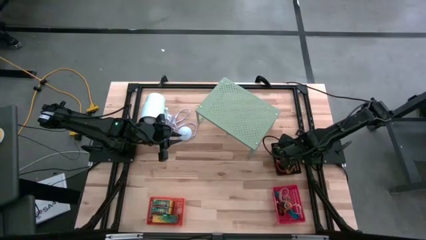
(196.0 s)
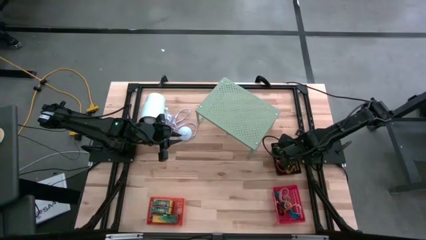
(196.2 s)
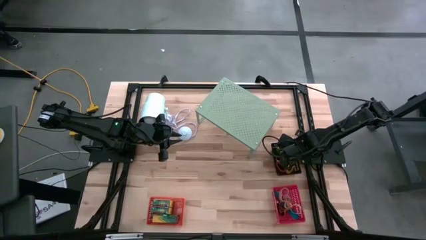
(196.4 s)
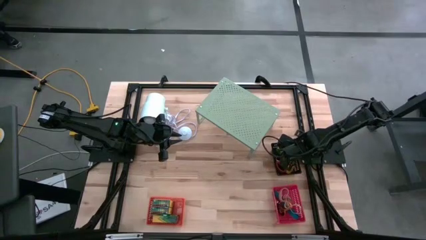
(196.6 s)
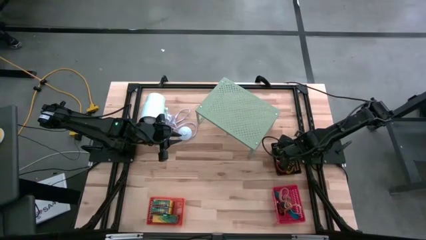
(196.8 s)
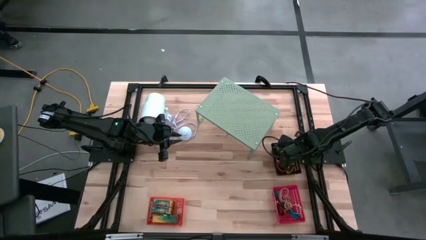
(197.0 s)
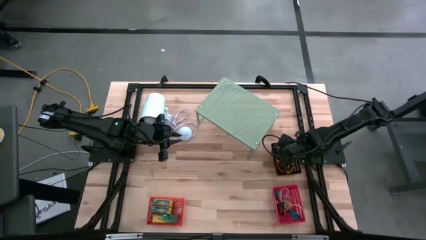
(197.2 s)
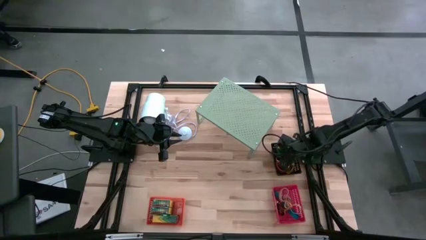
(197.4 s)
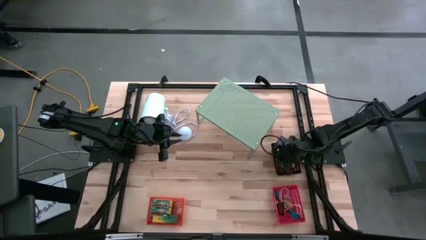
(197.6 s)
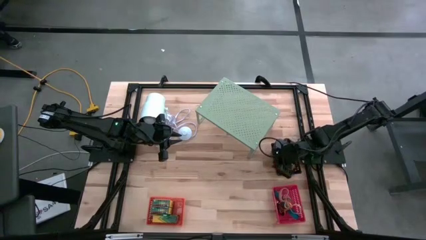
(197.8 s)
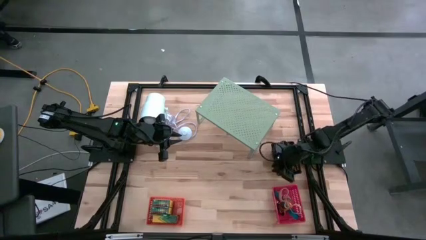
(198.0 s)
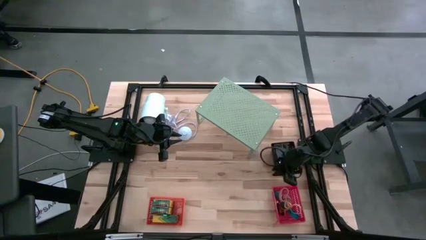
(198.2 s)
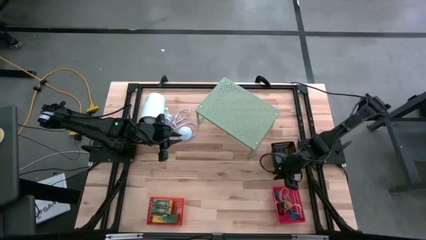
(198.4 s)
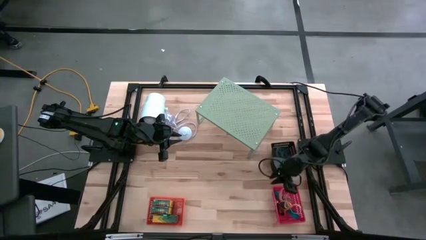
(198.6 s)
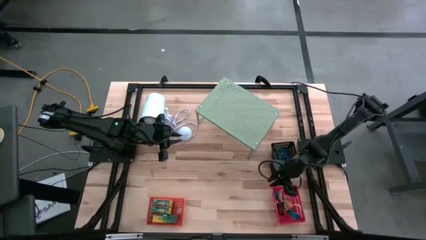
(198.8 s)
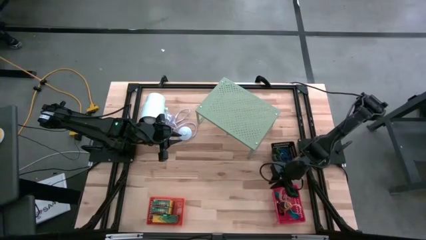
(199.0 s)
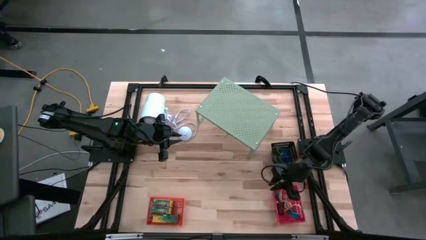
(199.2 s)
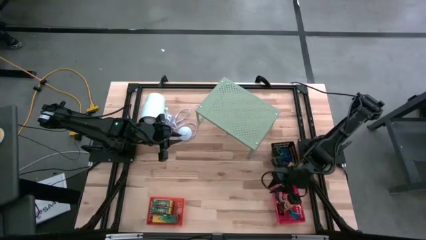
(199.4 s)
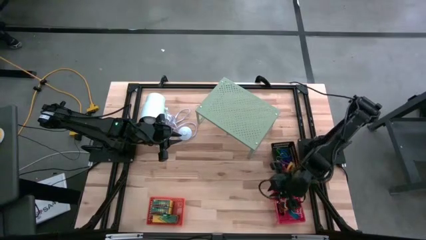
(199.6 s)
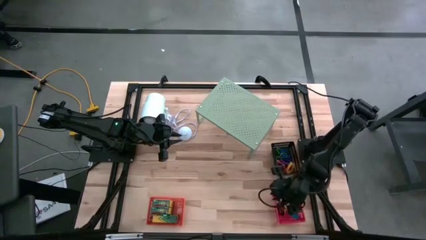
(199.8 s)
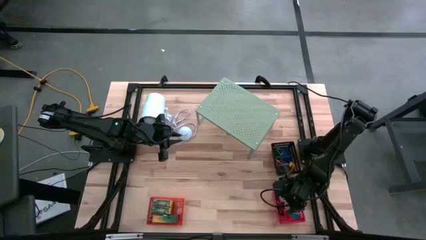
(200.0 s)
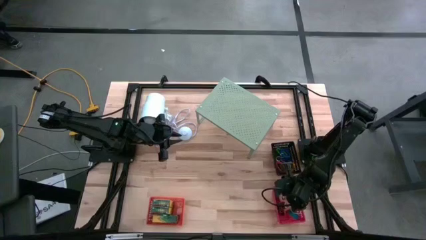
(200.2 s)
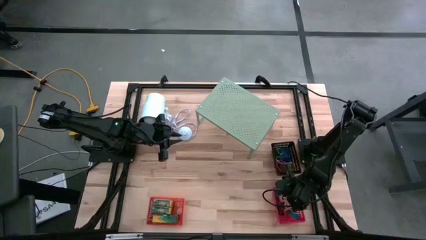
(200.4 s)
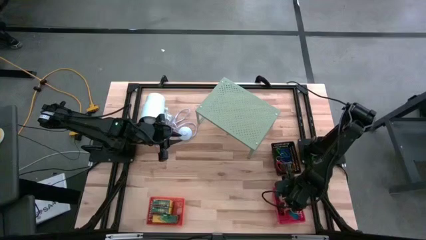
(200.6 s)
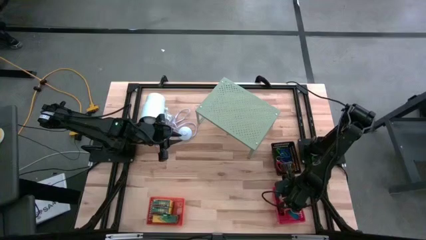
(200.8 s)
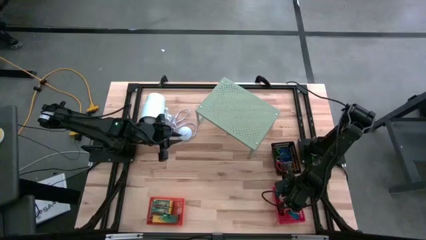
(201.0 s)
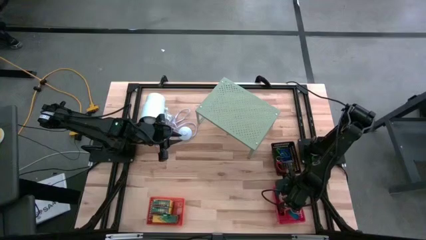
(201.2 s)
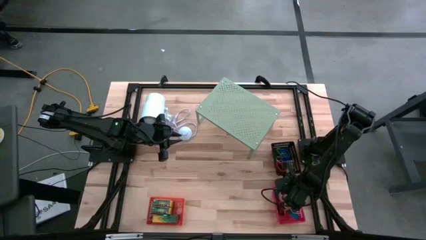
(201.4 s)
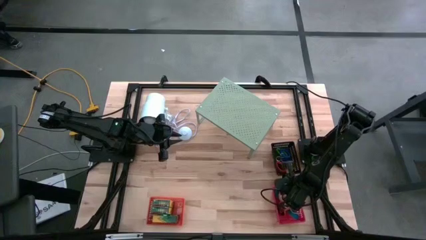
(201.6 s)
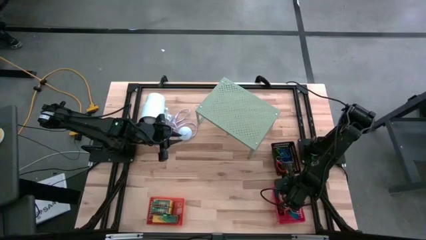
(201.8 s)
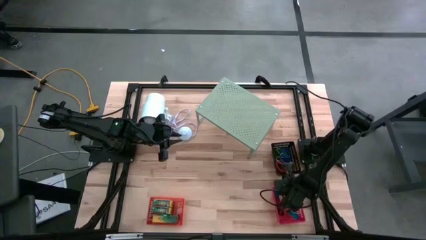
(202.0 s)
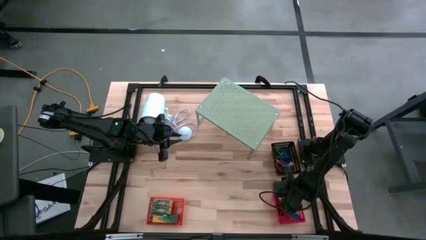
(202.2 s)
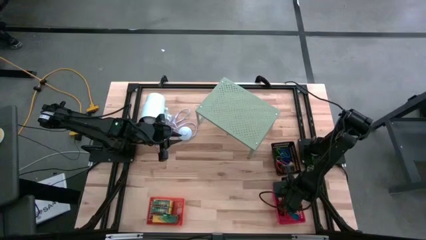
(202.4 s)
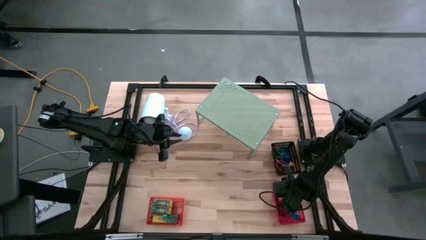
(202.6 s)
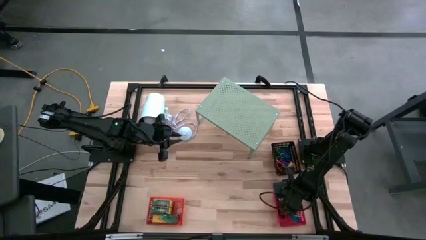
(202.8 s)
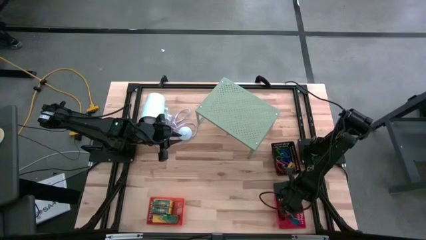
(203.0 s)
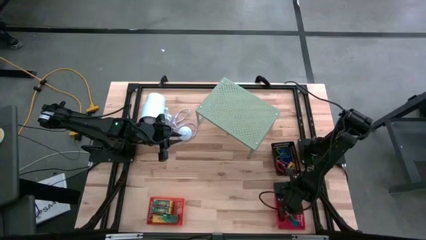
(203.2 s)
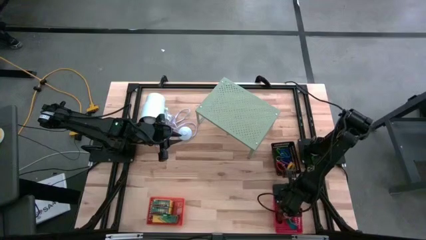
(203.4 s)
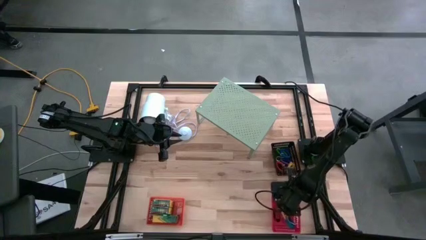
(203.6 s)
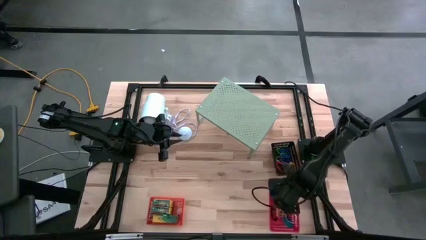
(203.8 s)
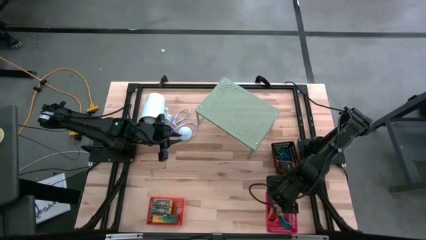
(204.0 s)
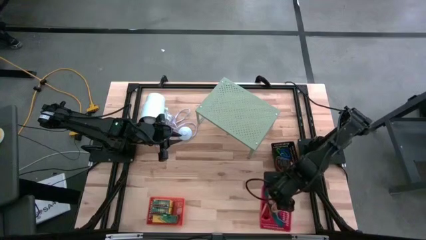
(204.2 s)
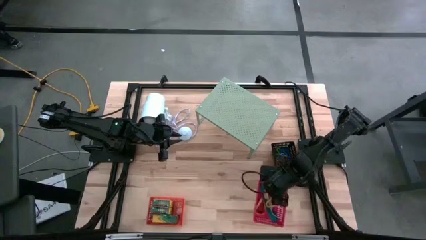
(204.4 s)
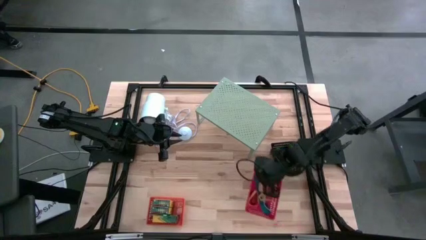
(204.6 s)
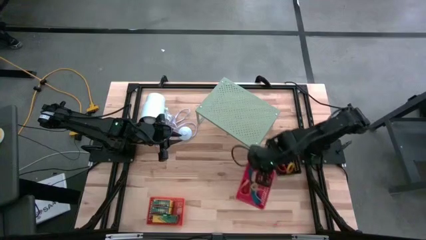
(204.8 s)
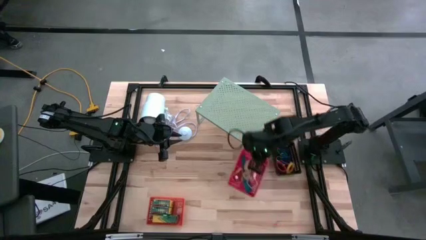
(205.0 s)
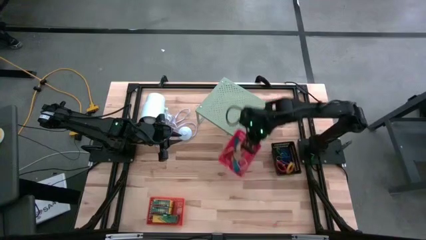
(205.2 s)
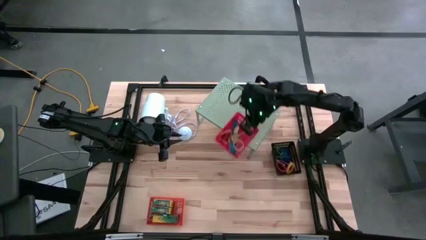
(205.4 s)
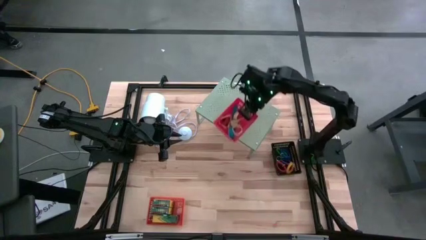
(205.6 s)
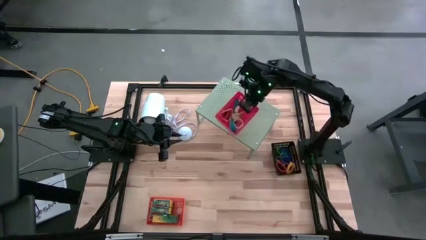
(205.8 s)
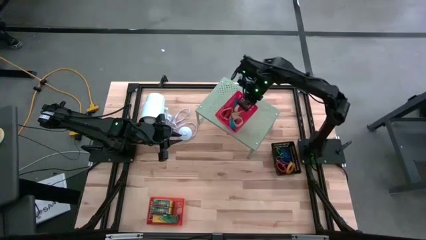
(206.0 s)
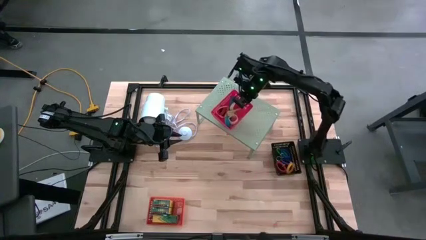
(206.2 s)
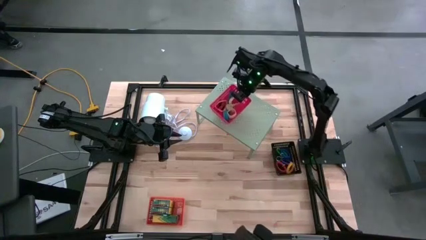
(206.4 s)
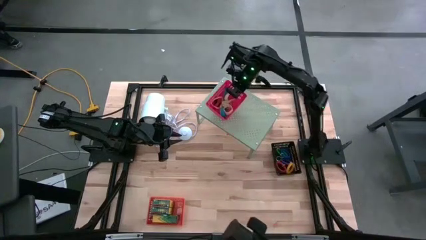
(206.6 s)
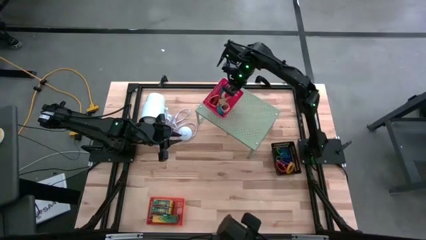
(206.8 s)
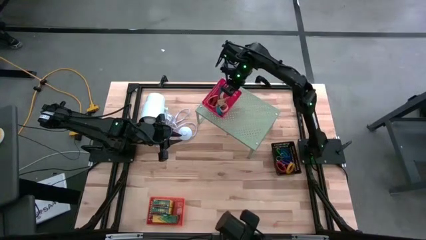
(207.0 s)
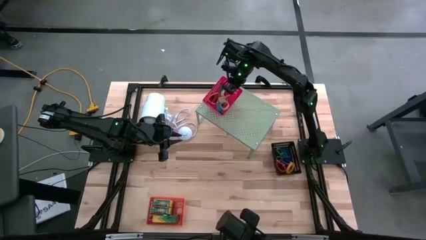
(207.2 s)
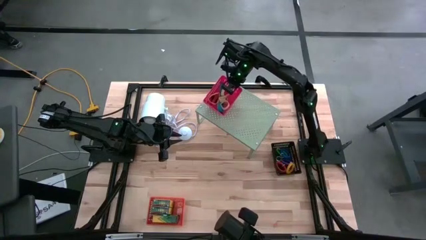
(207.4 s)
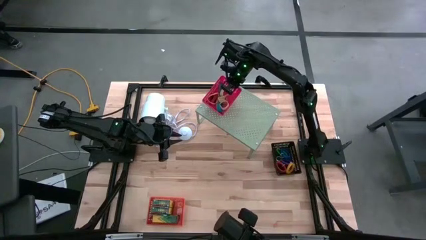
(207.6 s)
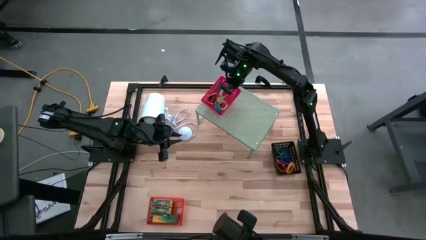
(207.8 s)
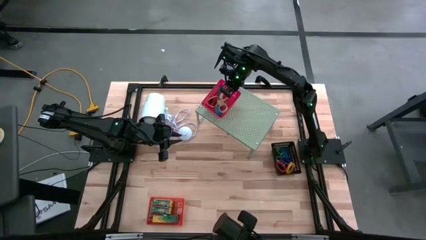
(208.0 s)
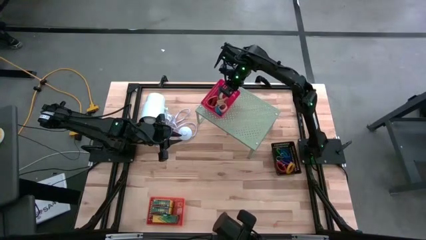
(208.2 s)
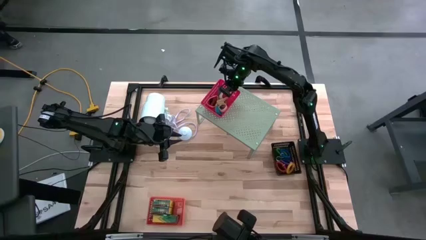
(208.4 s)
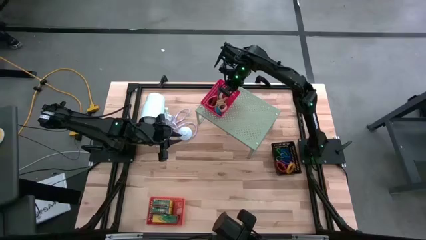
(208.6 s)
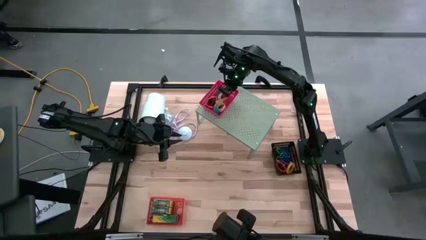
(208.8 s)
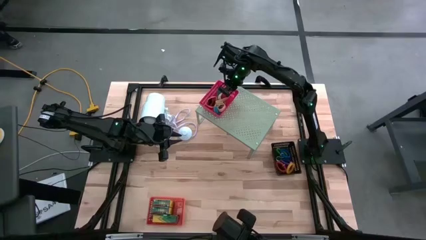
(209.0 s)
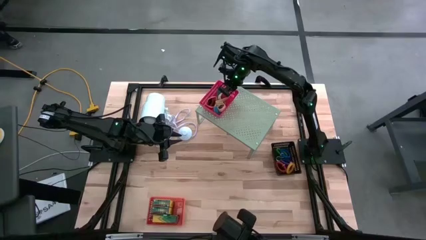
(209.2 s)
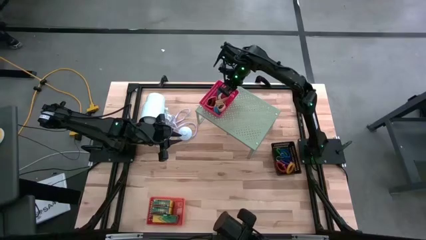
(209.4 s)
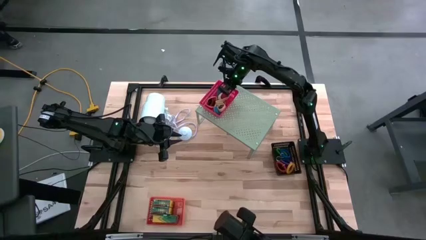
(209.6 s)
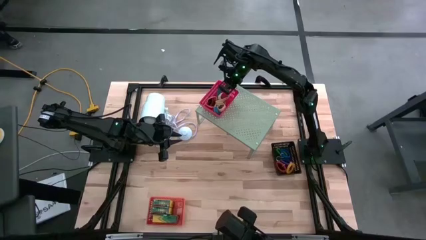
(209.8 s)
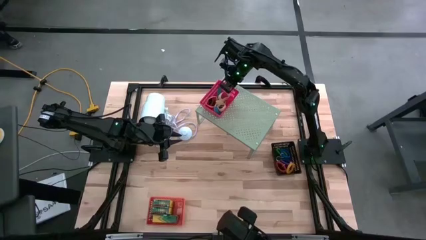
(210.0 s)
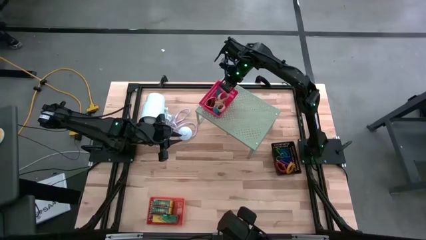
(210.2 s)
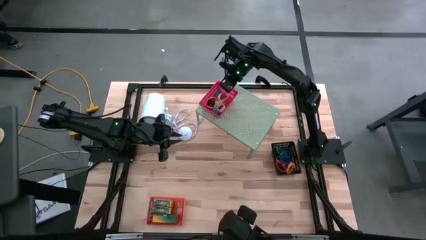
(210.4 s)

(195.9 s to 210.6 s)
Task: Pick & Place Office Desk Supplies
Put the red bin into the shelf
